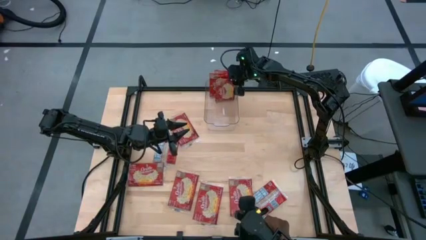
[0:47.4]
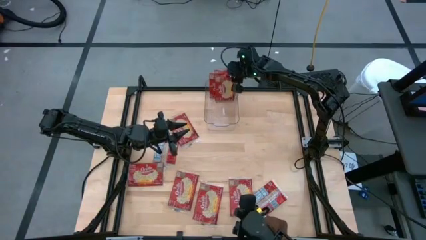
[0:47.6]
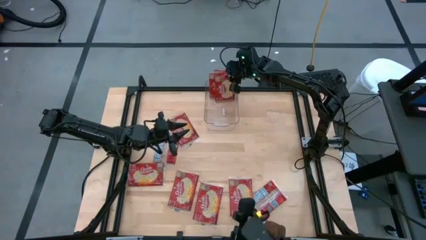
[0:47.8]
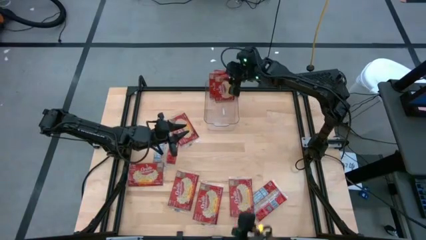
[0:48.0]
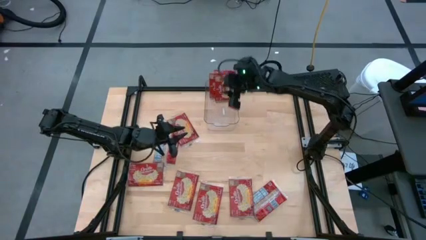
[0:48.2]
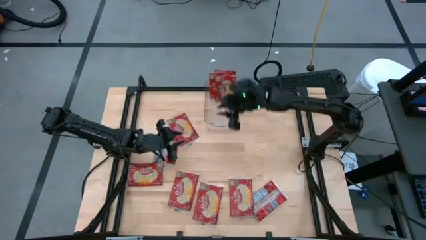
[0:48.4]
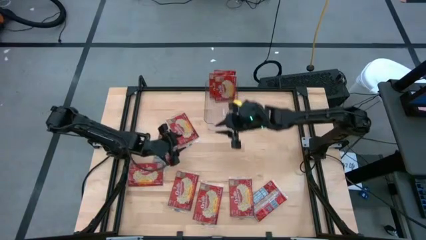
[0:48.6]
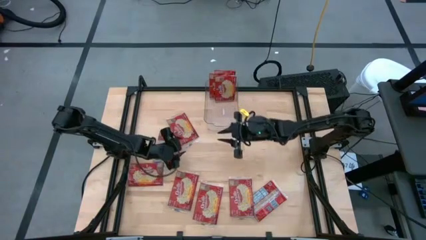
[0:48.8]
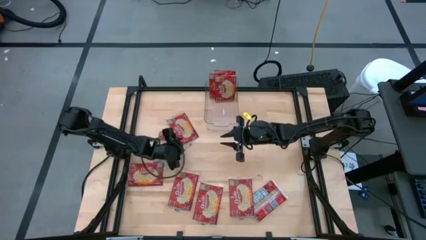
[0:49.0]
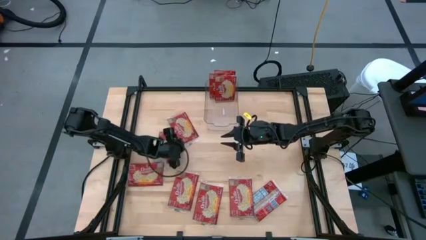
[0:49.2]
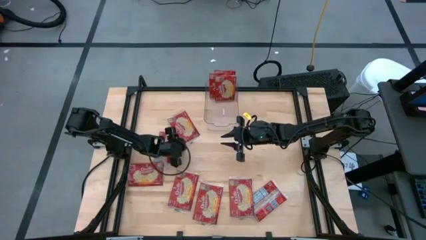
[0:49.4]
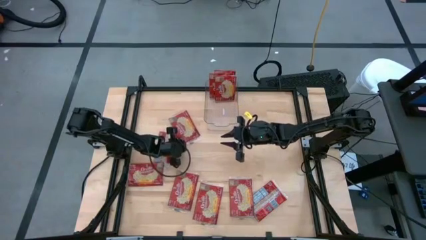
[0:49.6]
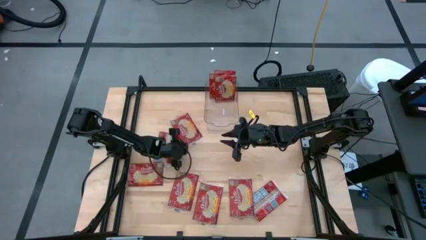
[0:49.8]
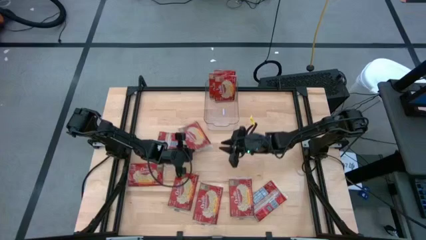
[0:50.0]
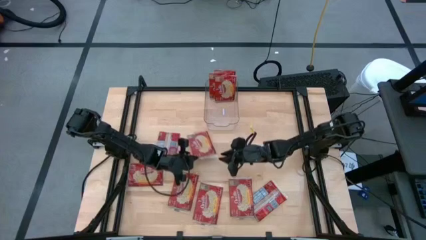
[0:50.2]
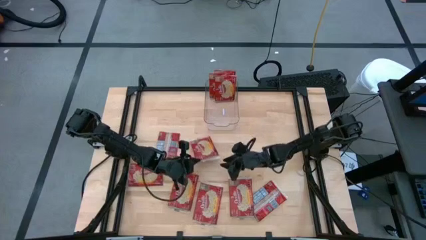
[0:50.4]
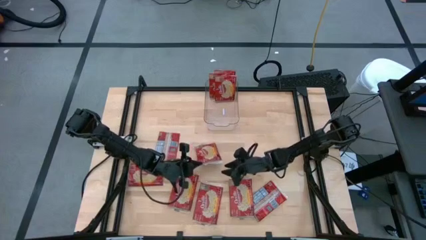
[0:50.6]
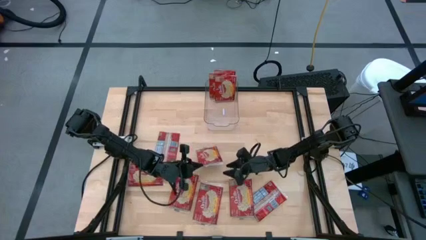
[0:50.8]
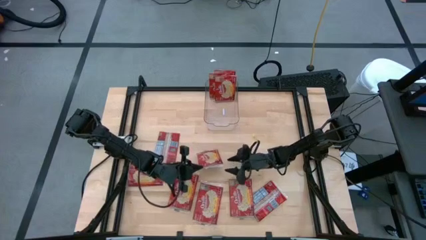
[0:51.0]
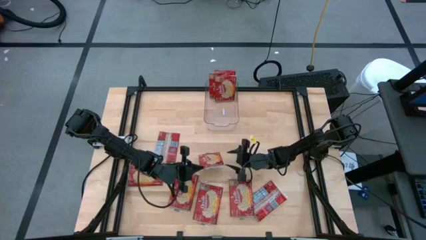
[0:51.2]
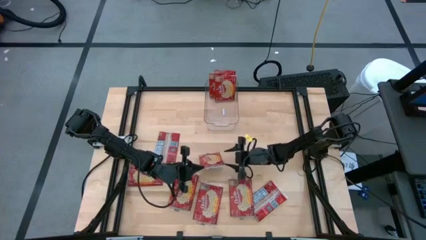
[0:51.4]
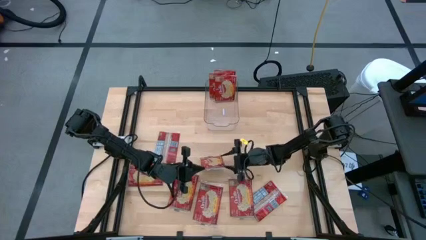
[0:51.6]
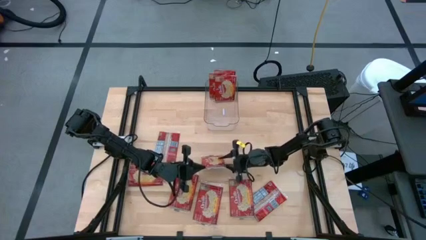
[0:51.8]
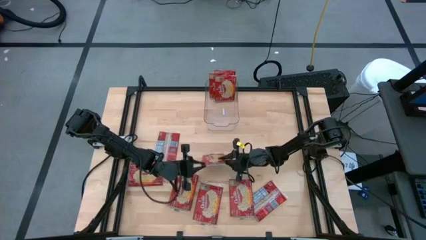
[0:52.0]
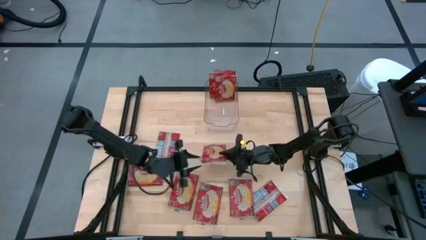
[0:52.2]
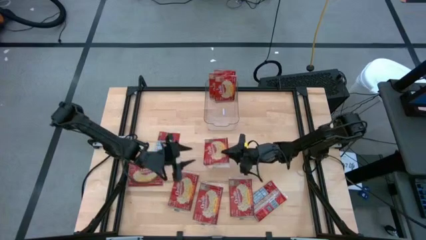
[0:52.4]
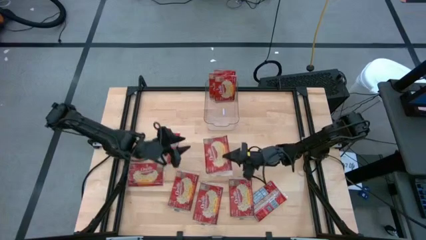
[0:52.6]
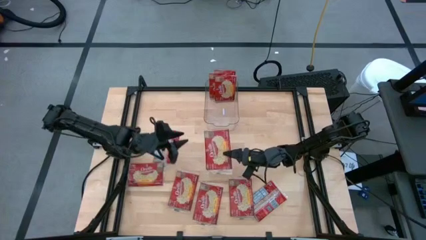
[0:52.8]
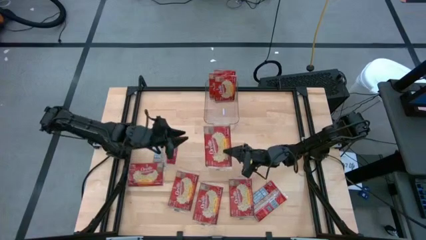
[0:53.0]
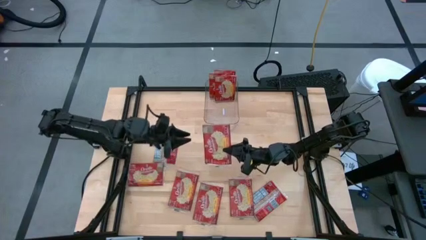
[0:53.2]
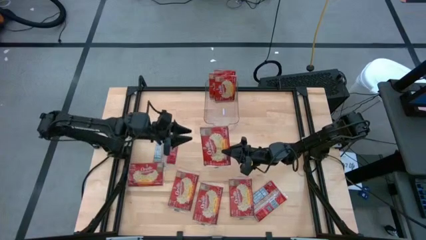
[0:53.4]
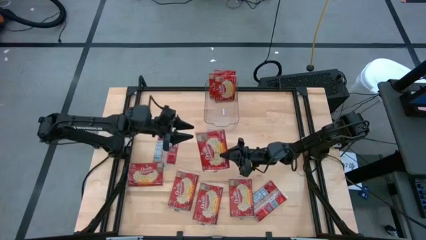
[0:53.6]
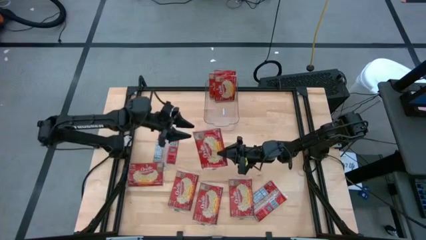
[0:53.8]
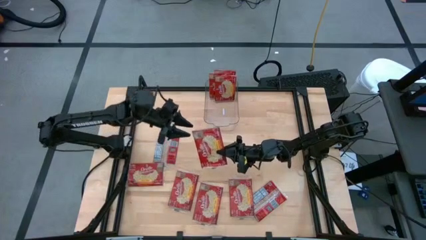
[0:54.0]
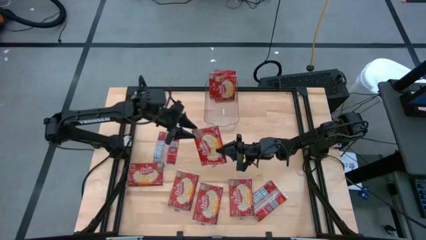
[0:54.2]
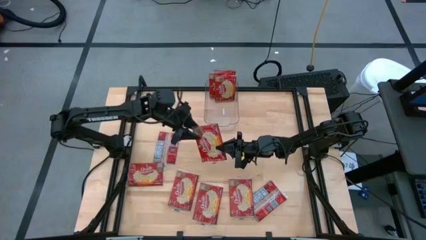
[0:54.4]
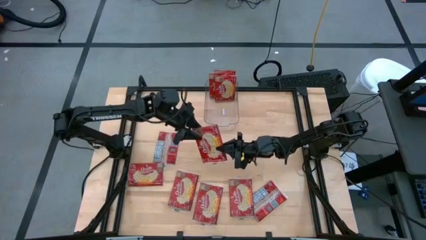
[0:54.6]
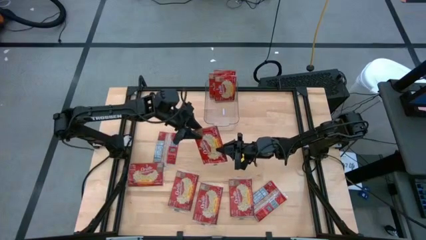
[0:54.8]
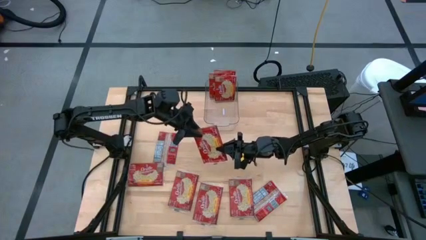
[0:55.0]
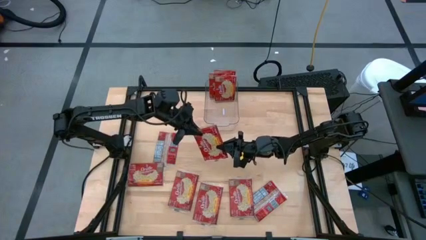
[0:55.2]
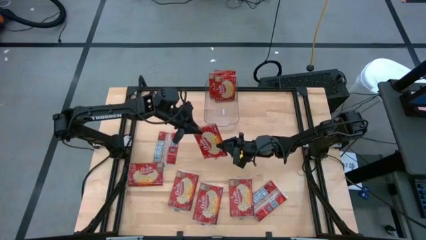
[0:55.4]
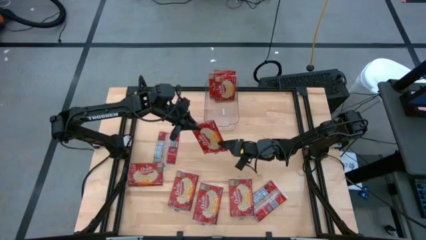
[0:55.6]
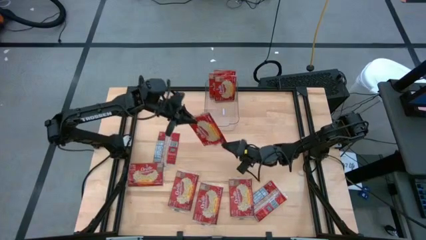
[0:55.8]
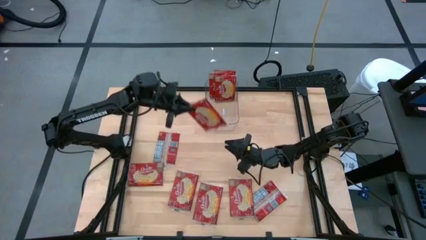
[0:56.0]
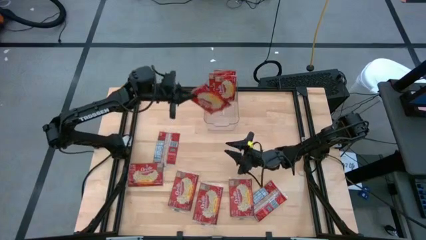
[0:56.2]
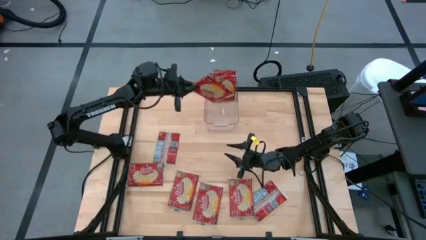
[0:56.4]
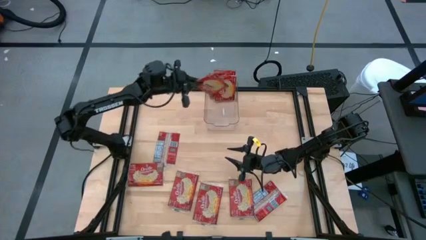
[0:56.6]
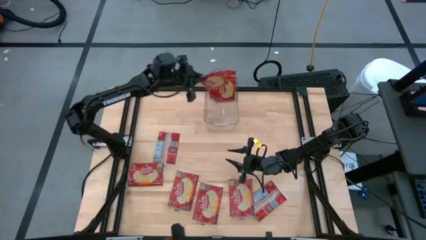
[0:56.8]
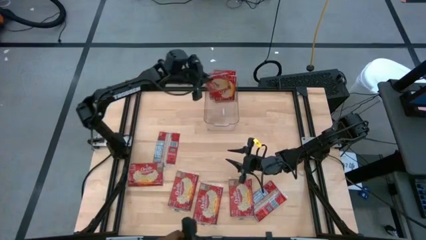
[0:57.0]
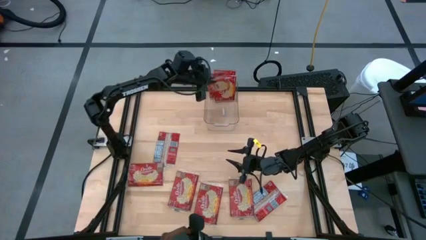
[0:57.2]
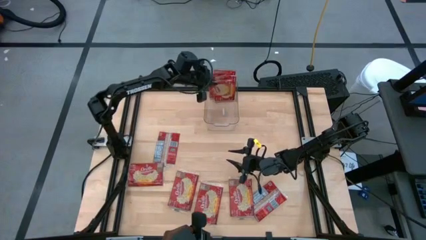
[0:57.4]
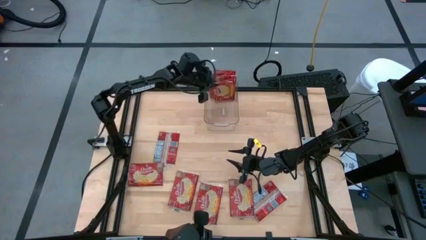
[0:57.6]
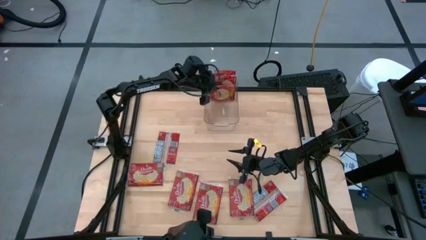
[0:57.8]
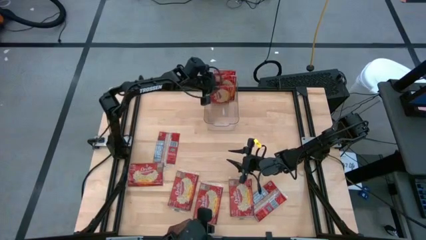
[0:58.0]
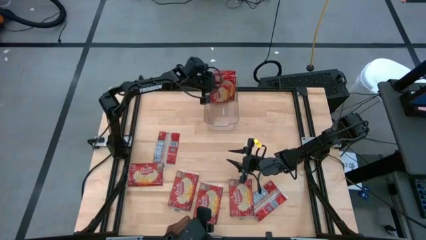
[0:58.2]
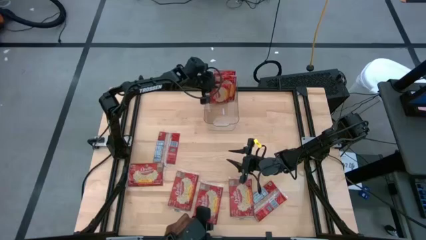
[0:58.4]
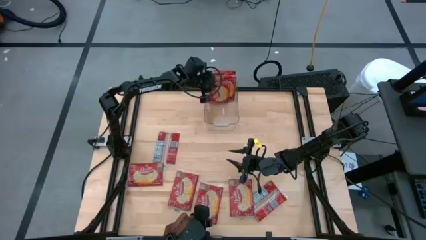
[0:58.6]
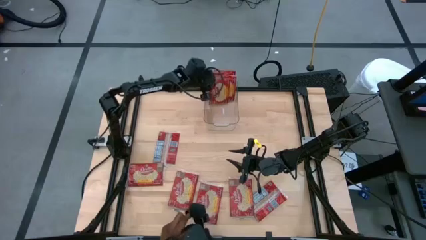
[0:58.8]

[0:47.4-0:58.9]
Task: Sort popcorn bags into baskets
Put the red popcorn pack into the transparent bin
